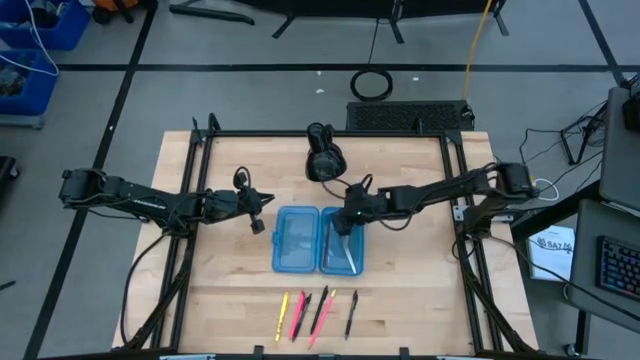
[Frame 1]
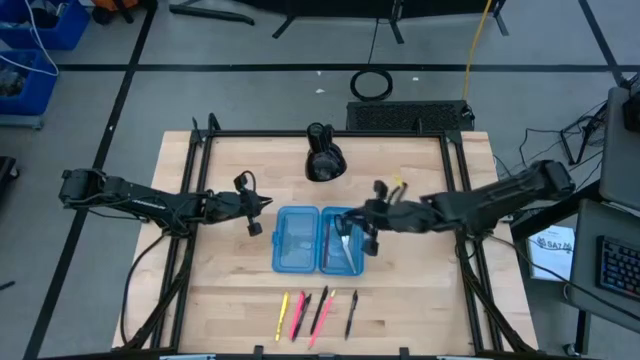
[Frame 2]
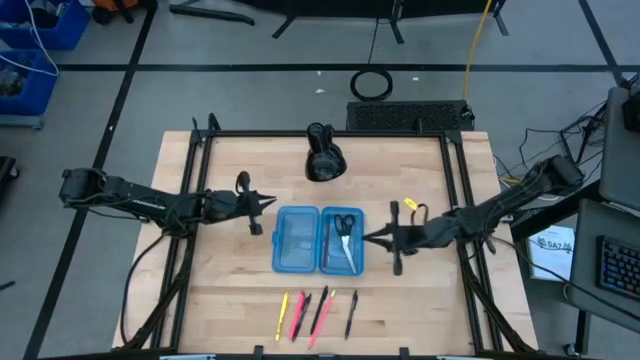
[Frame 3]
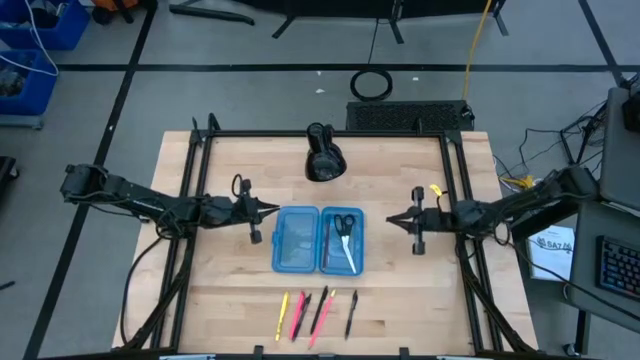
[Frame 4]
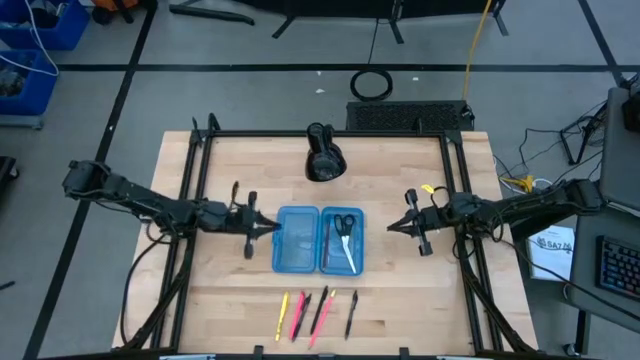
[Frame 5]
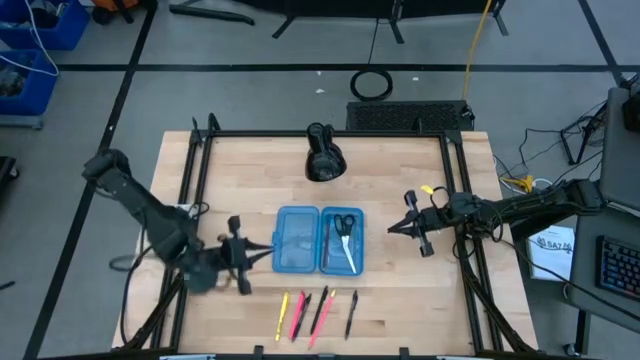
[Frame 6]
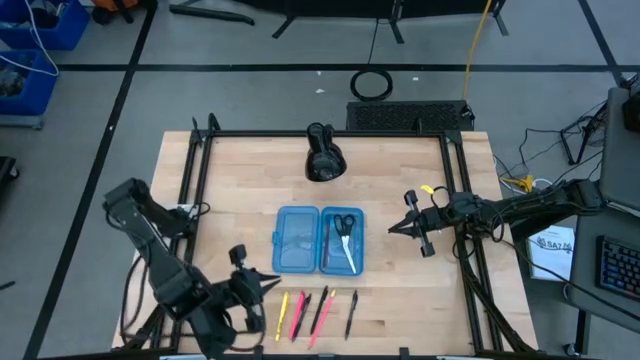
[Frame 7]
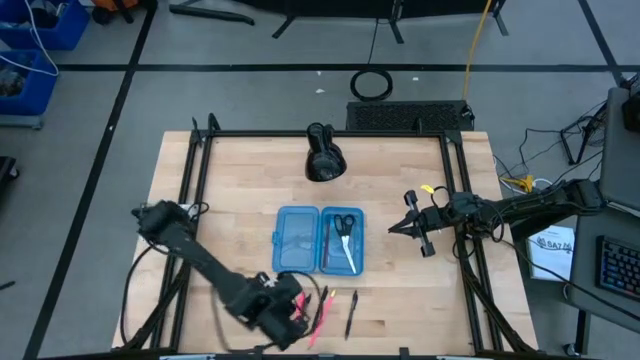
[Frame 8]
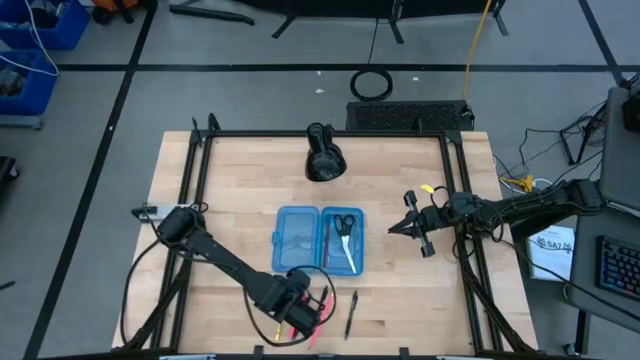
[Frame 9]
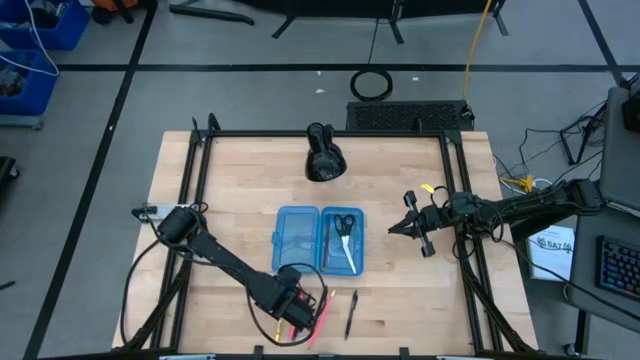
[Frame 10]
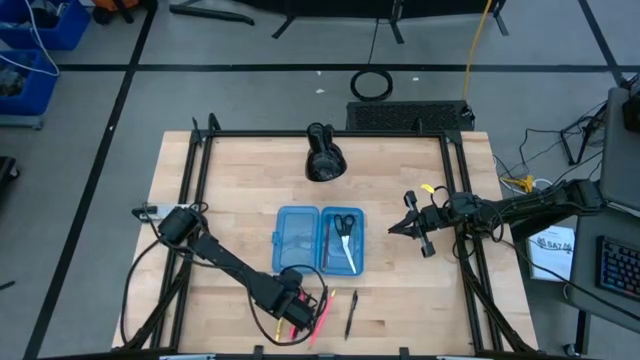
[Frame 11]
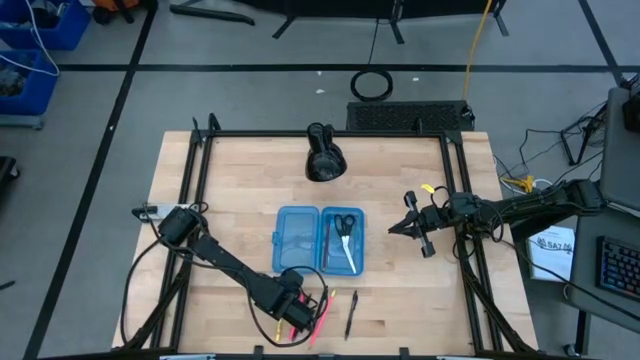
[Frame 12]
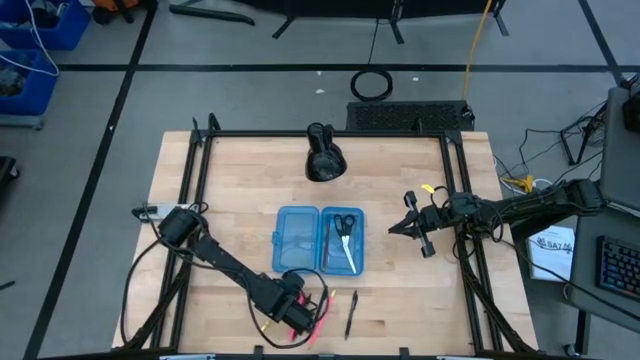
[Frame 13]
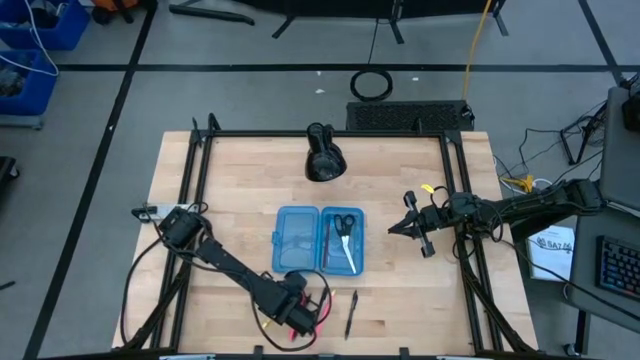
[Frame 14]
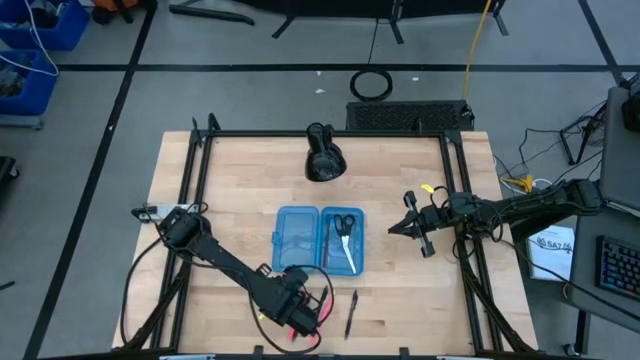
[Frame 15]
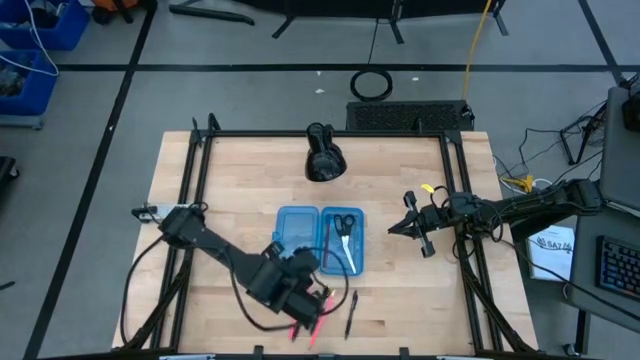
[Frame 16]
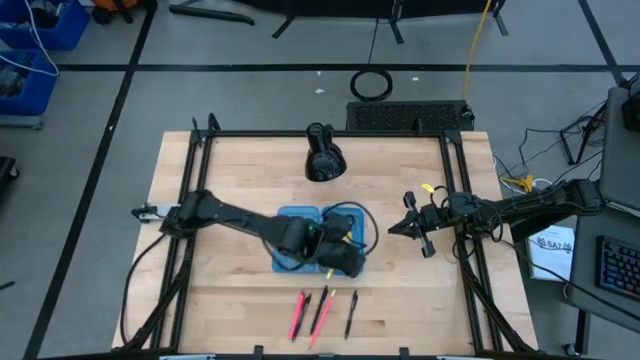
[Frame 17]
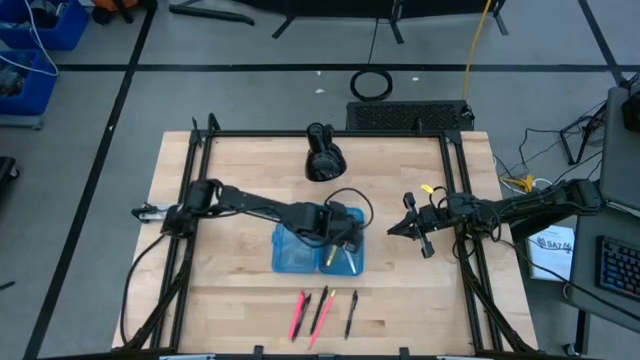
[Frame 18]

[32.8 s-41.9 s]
Task: Pick & place school supplies into a supply box
Put the yellow pen into the blue supply box

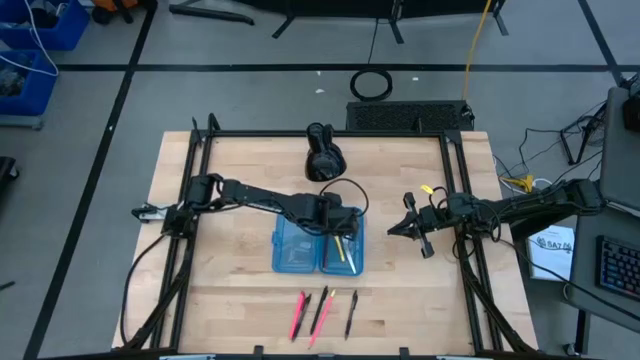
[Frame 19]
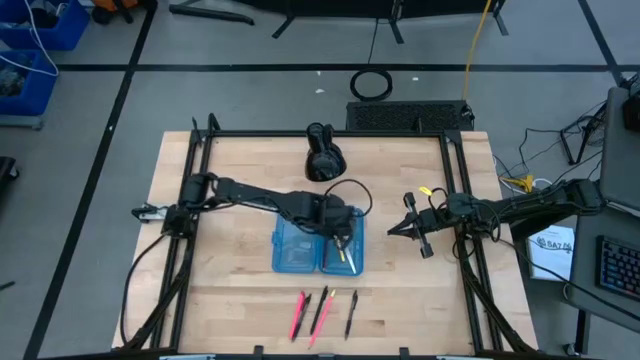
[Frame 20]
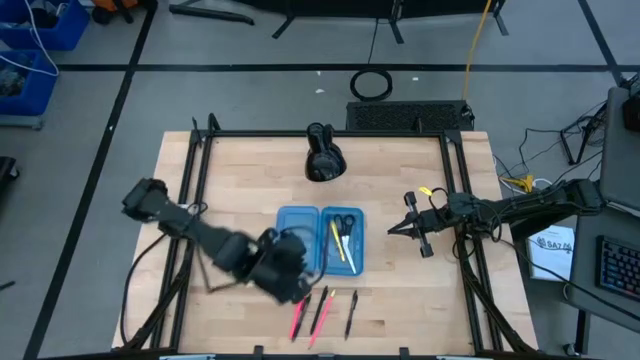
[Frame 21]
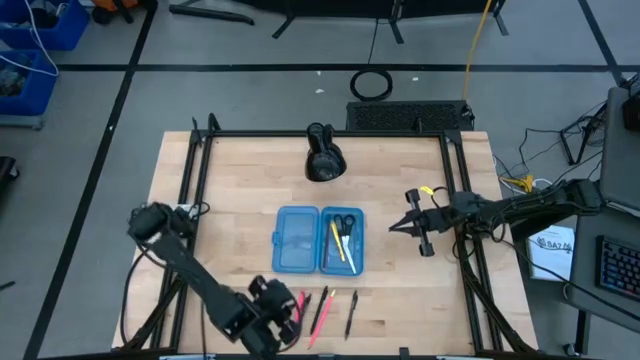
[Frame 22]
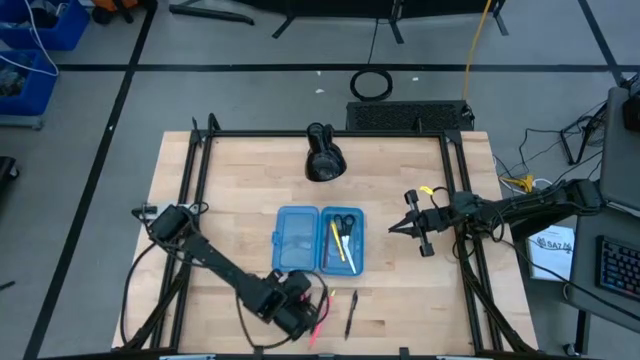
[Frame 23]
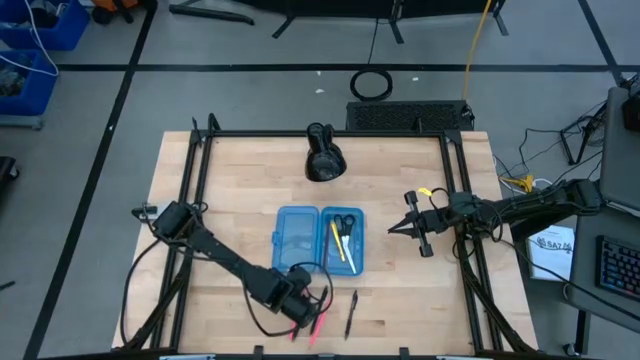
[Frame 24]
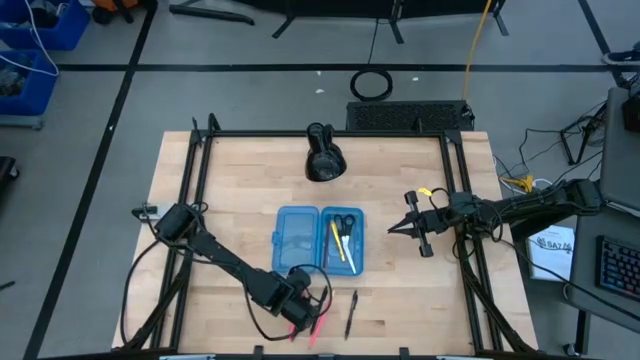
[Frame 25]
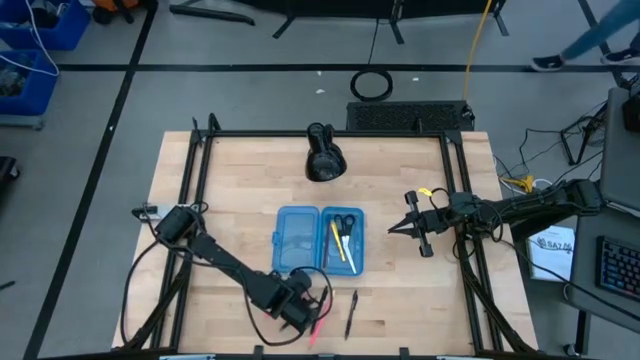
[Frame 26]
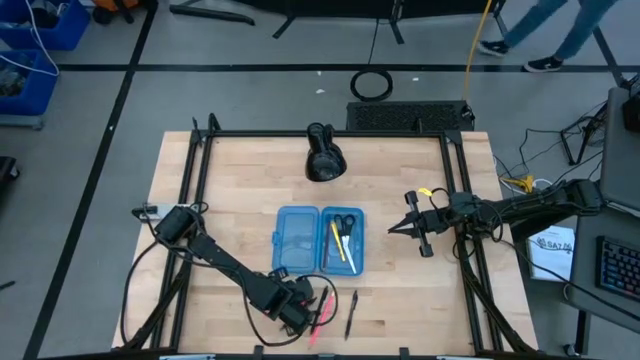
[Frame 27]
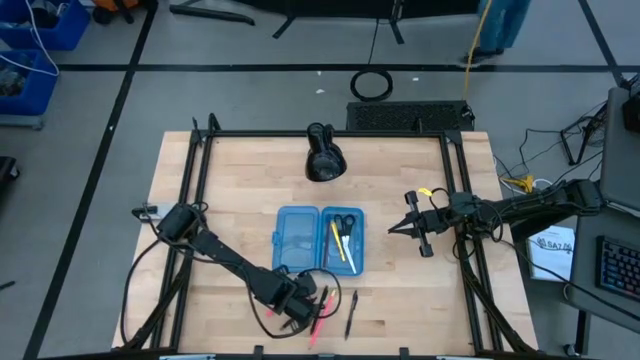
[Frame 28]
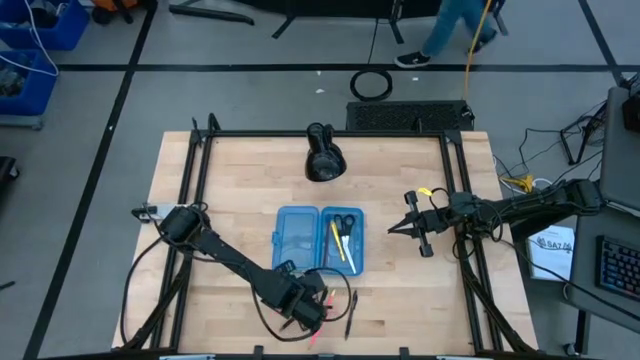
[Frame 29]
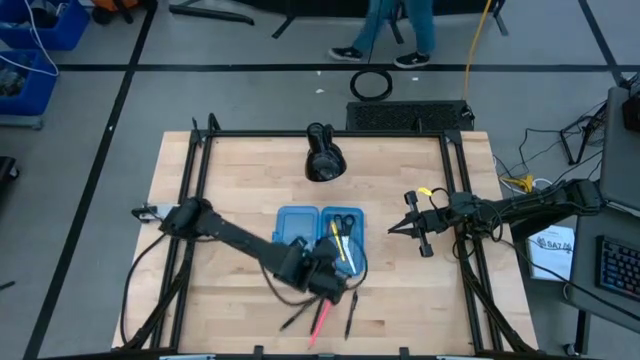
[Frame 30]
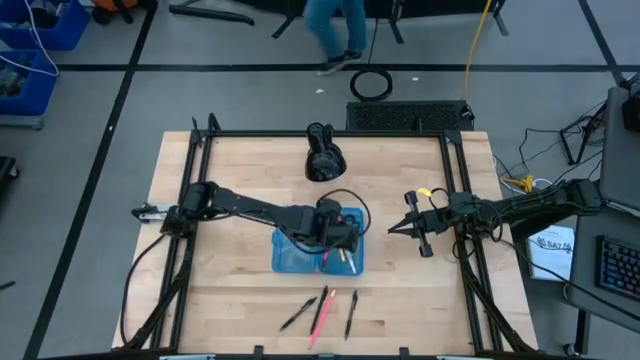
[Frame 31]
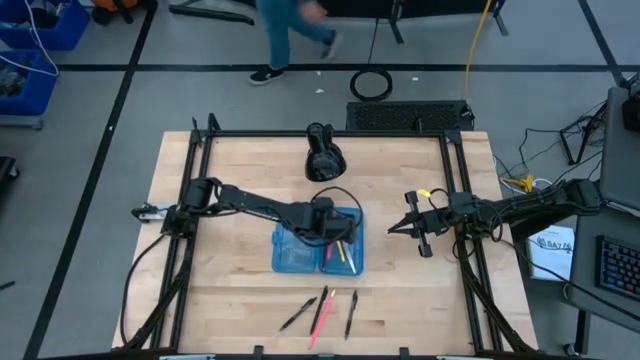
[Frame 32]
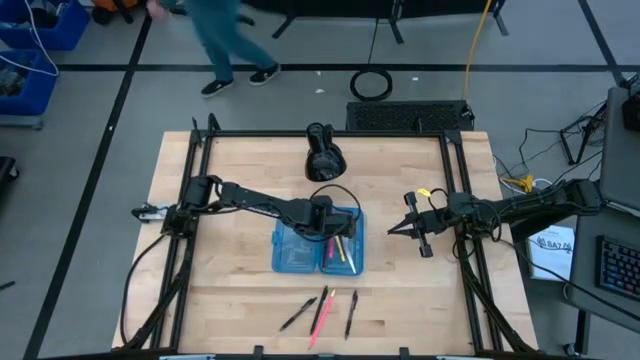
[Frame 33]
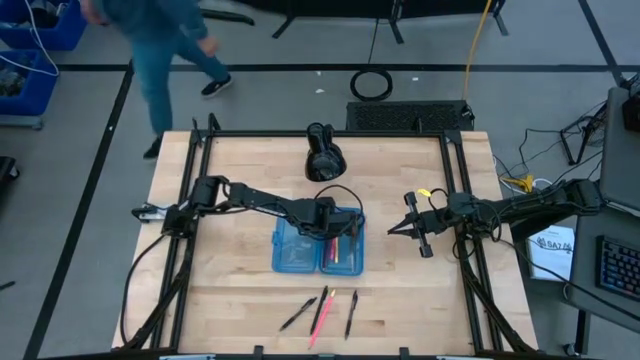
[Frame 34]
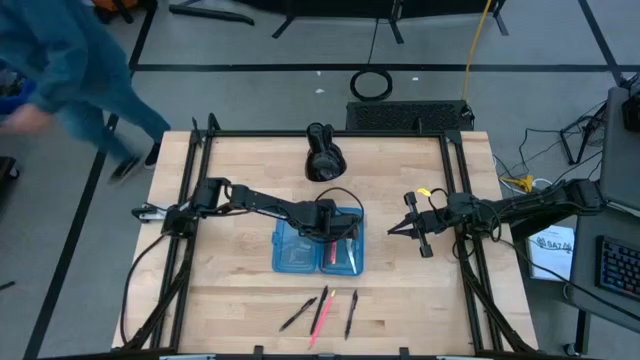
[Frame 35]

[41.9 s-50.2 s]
Put the left pink pen into the blue supply box

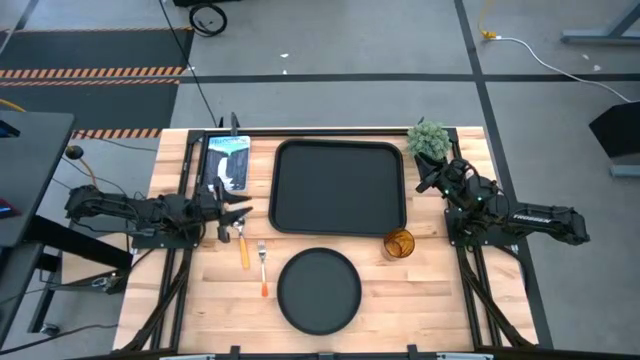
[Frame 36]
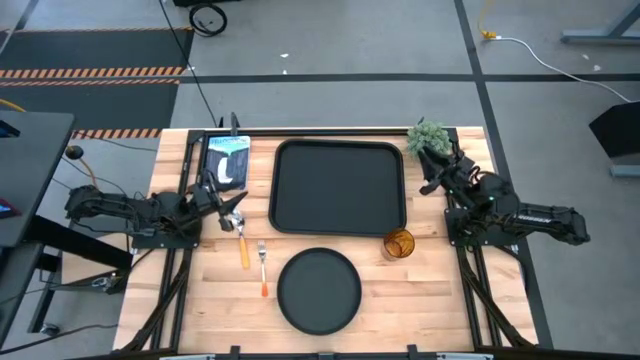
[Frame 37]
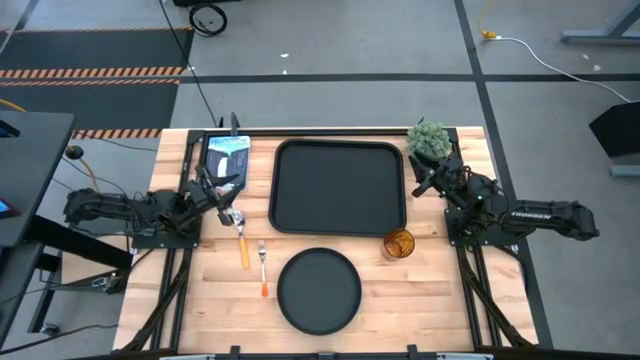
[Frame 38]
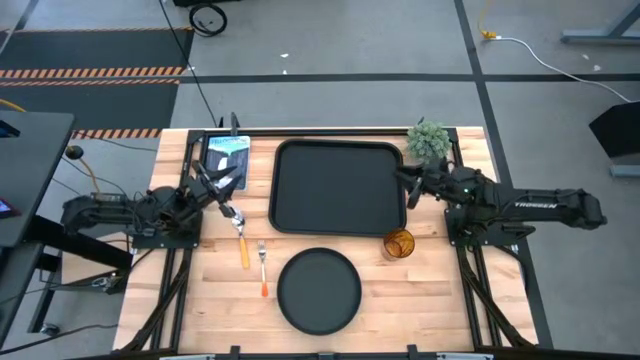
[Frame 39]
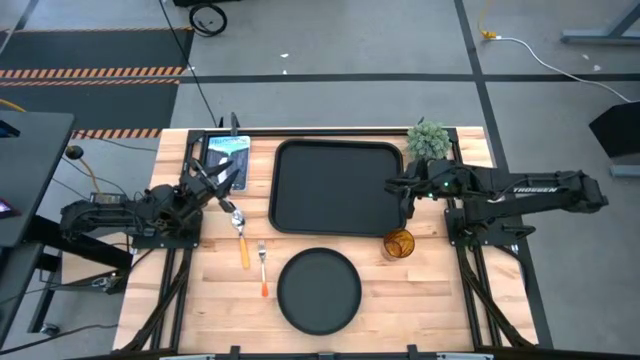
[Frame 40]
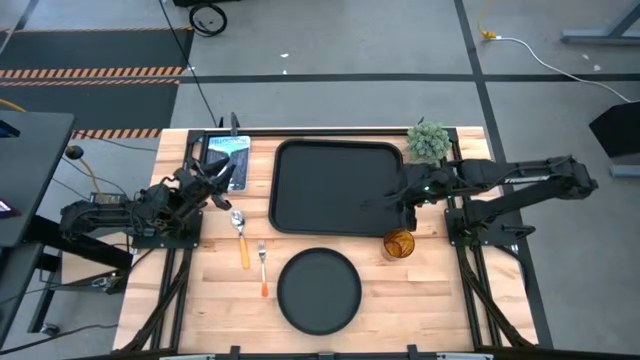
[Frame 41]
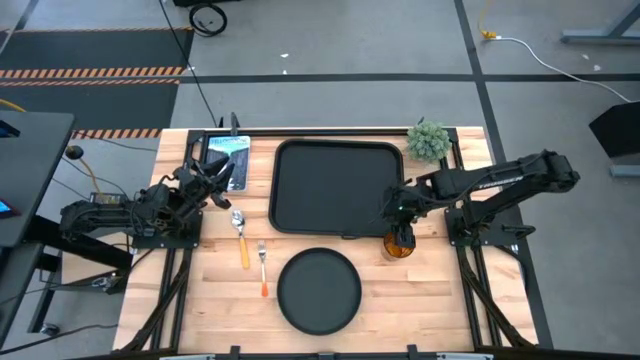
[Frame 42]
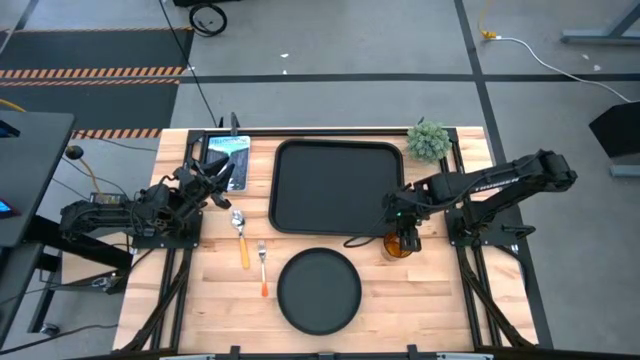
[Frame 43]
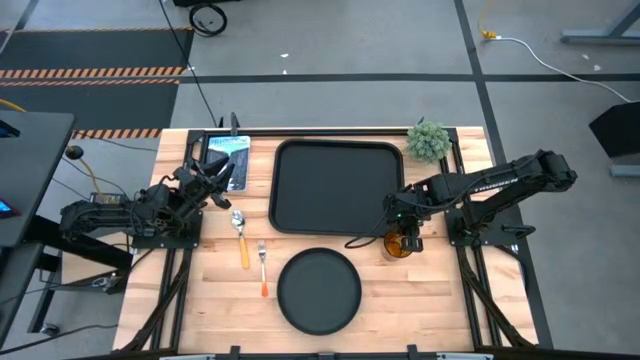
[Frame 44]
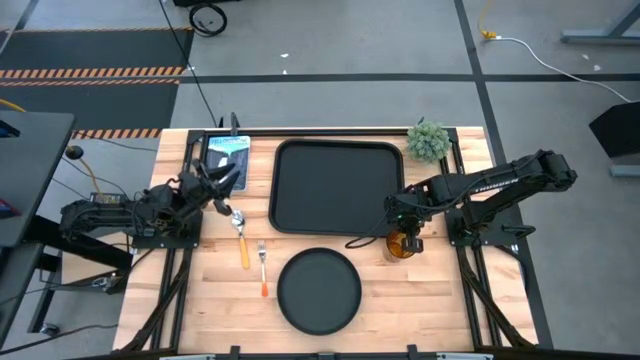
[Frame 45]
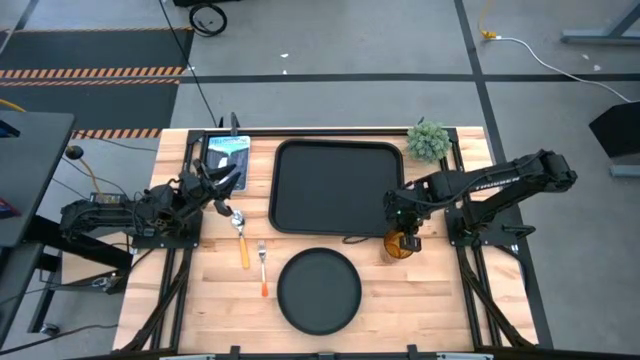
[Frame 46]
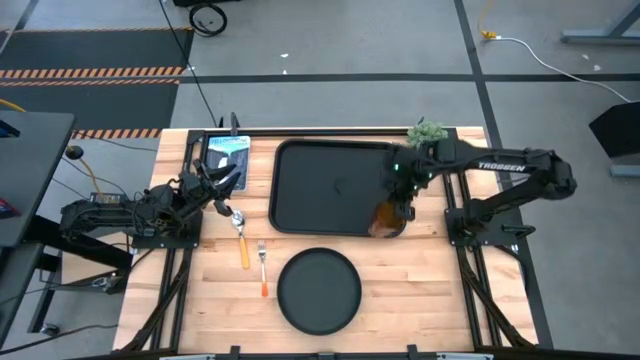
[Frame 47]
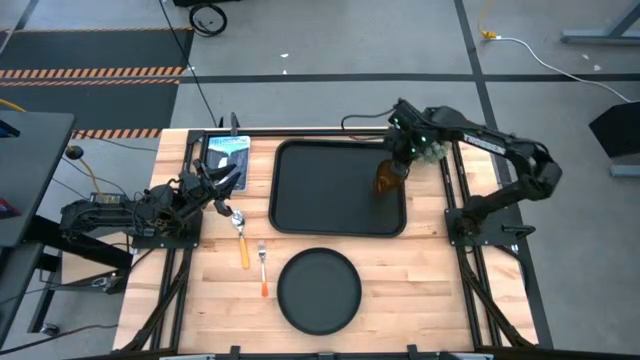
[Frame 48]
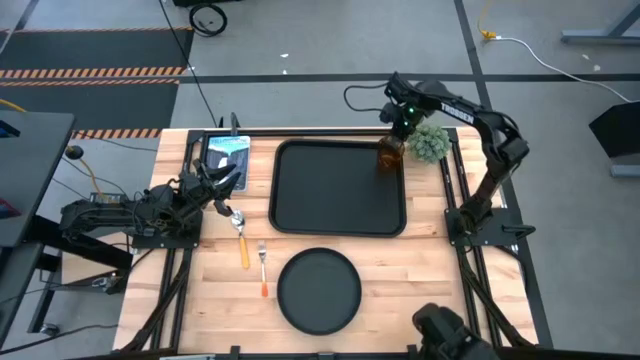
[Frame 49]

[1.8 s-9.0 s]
Task: Pick and place plate/cup/fork/spoon on tray
Put the cup on the tray
